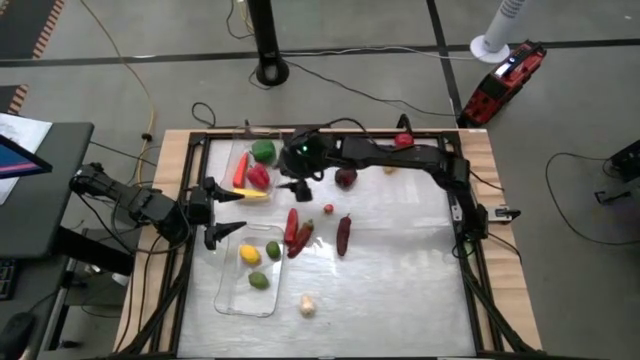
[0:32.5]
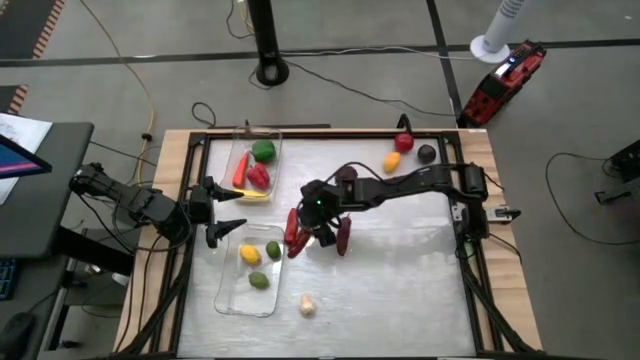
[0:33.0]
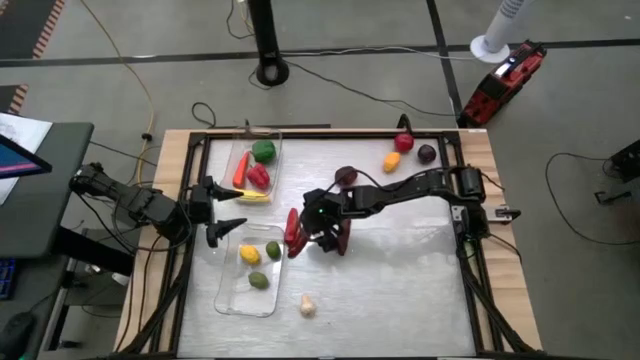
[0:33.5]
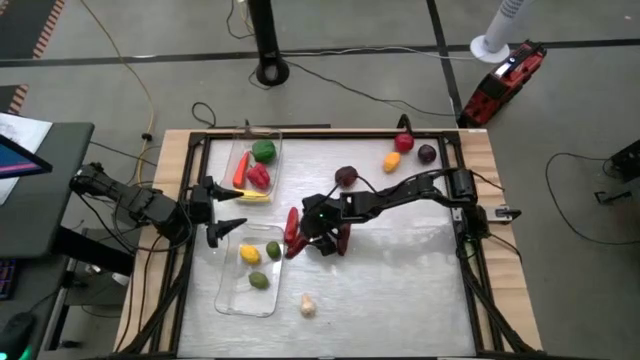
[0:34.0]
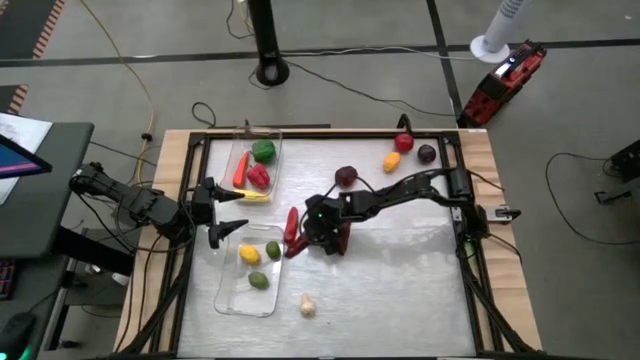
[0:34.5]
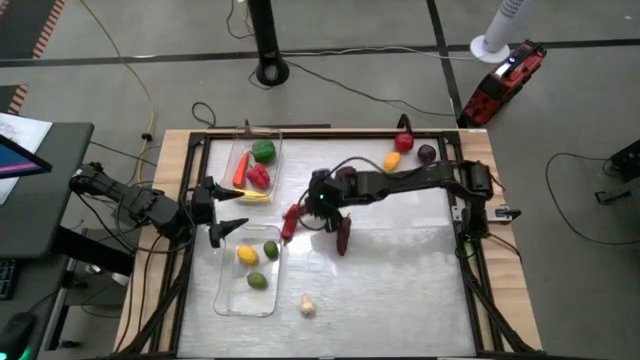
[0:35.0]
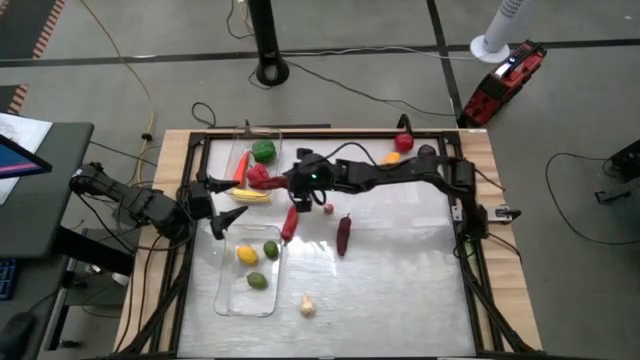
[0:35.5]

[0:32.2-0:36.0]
Task: Sort produce into baskets
Put the middle red chili pepper into the top transparent bin

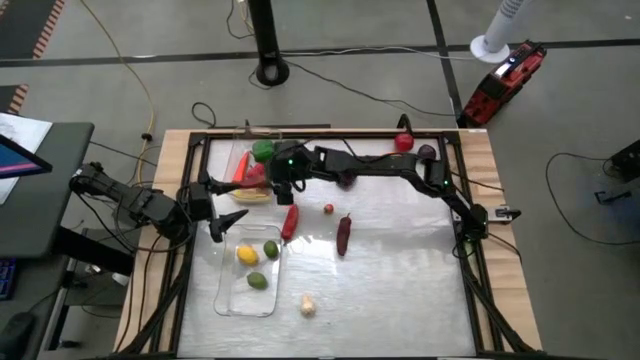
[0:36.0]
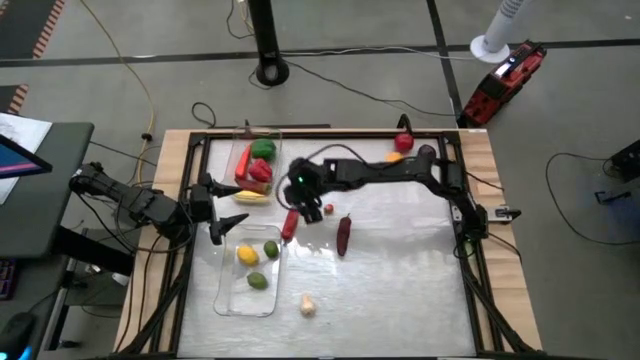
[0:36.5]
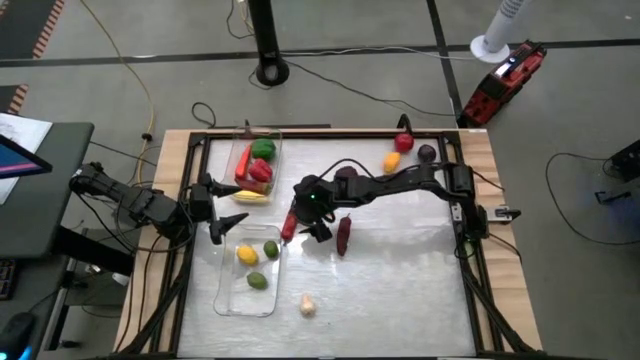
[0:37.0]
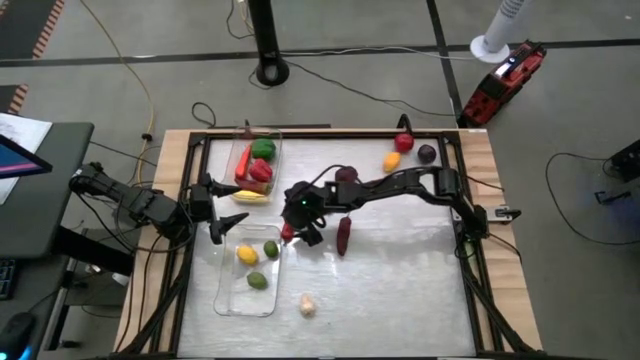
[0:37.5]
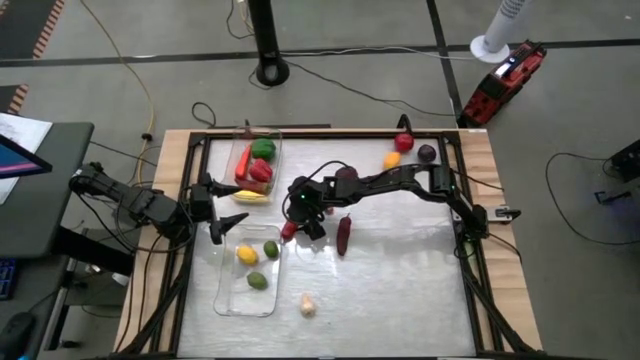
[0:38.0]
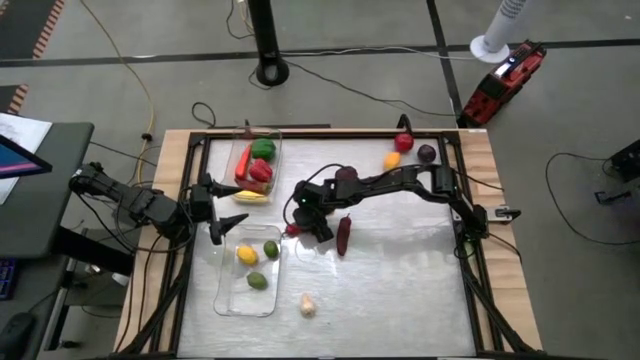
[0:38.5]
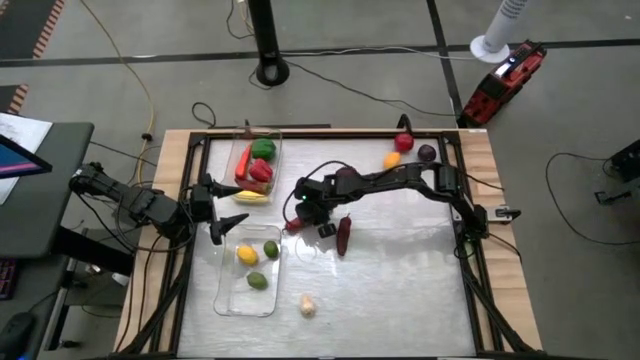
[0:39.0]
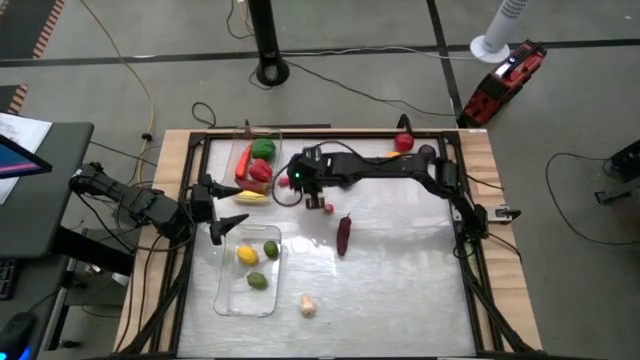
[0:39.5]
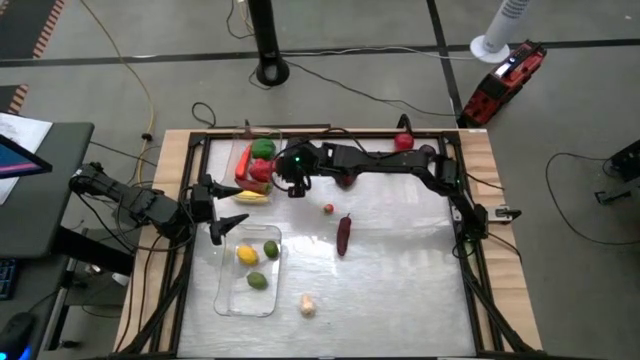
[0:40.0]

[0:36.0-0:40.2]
Put the left red chili pepper into the top transparent bin

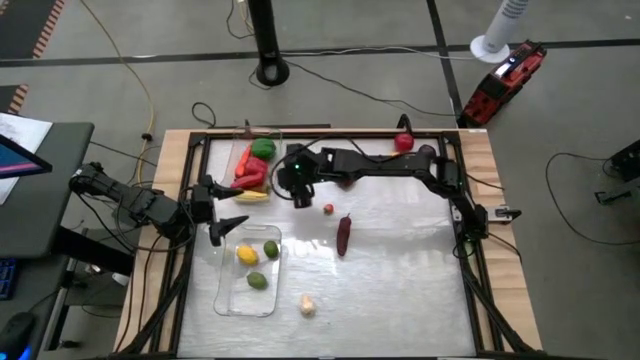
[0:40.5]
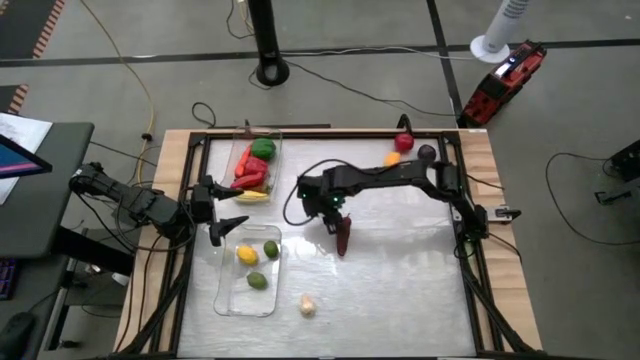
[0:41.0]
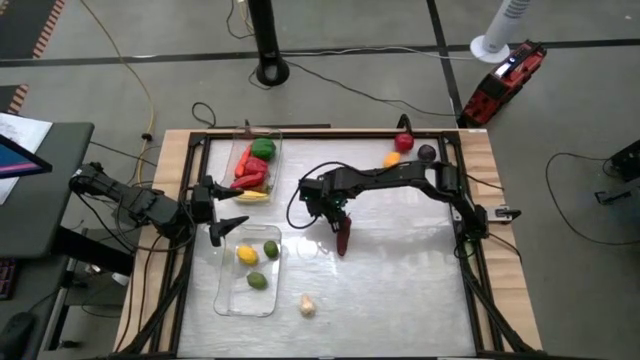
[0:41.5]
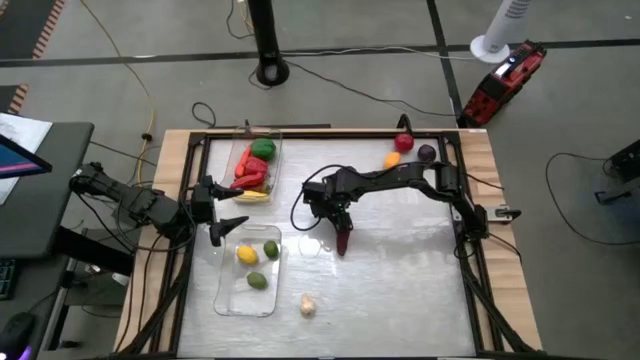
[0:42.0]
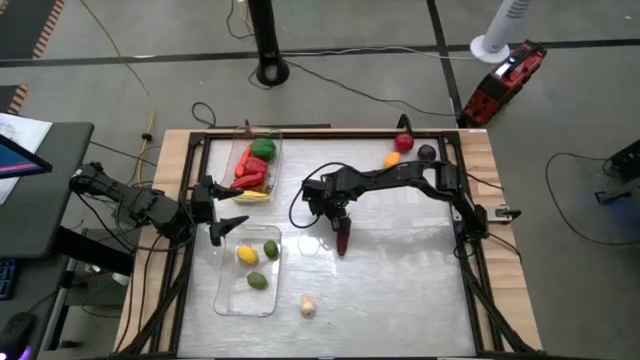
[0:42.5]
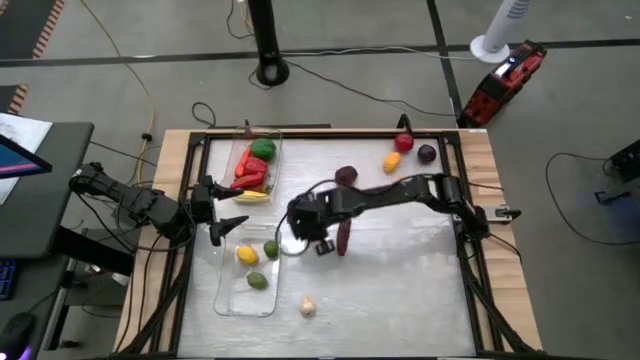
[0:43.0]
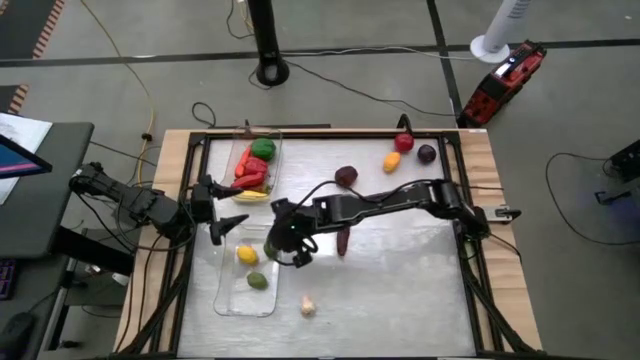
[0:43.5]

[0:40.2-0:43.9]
Put the strawberry into the bottom transparent bin

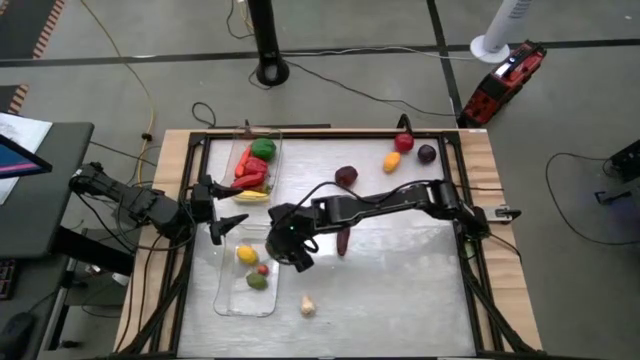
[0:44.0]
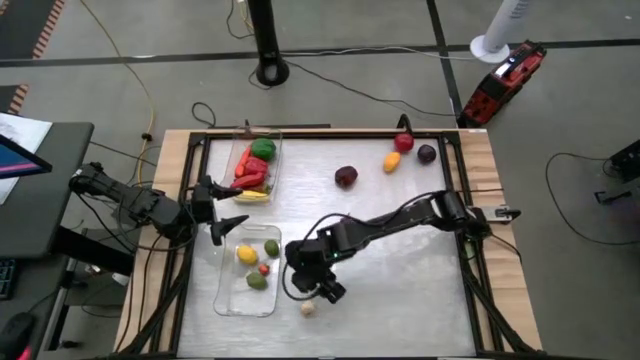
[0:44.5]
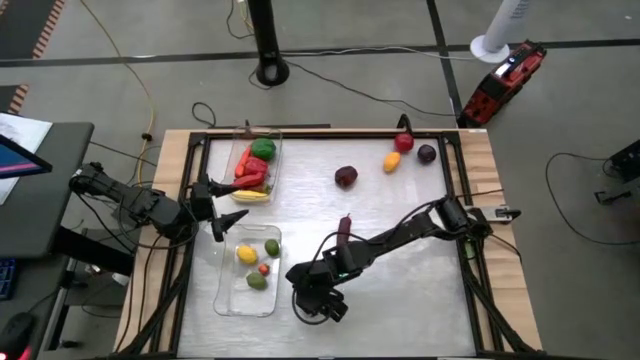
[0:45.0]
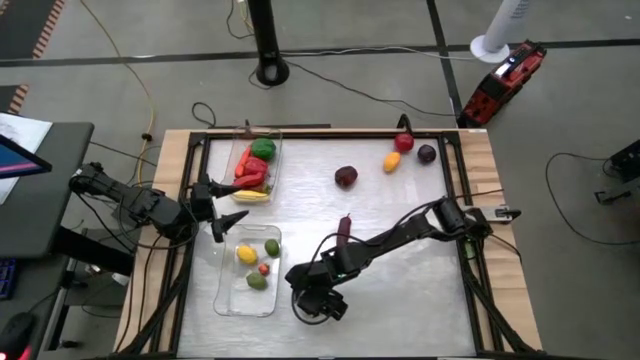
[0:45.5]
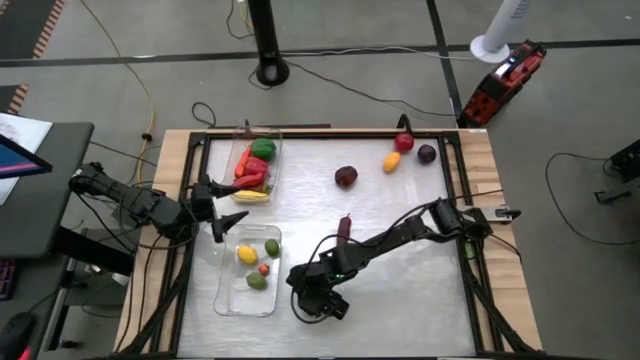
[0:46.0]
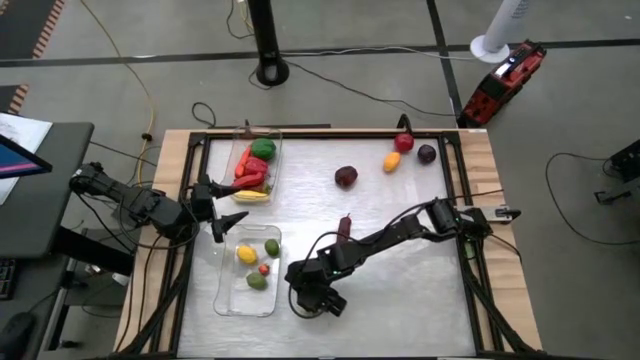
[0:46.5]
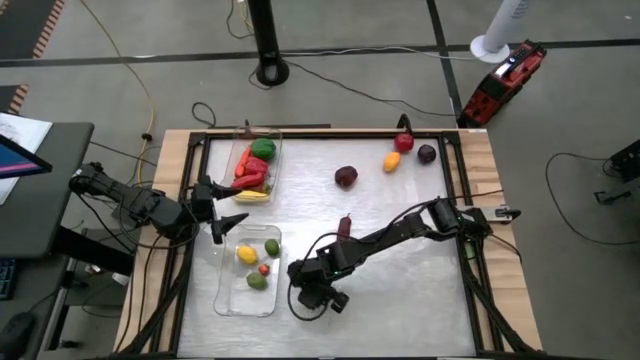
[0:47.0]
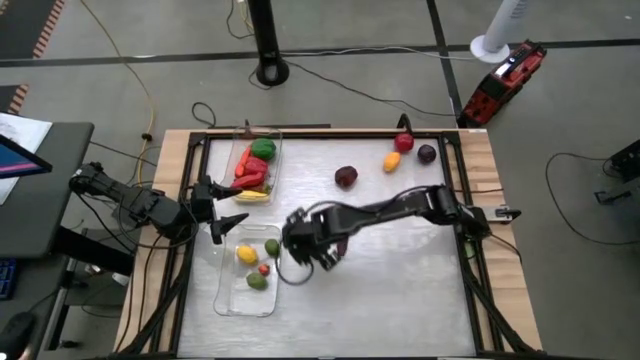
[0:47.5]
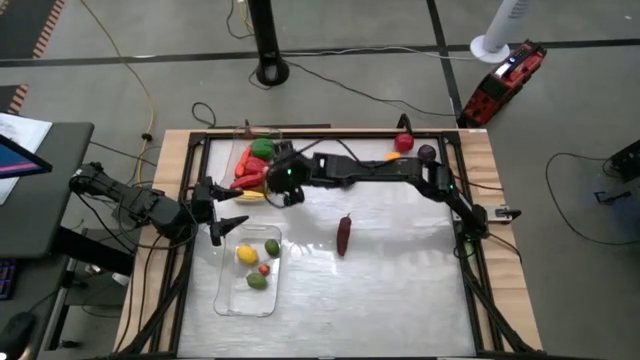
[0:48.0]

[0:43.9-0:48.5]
Put the garlic into the top transparent bin

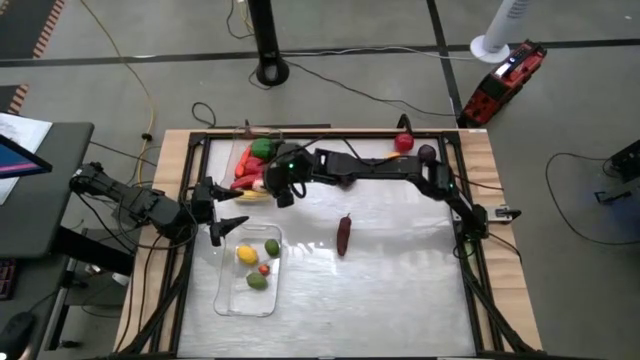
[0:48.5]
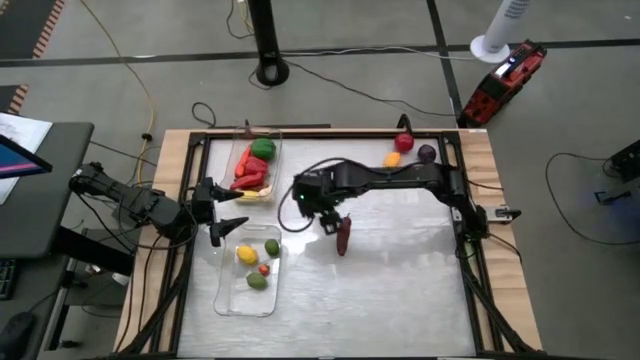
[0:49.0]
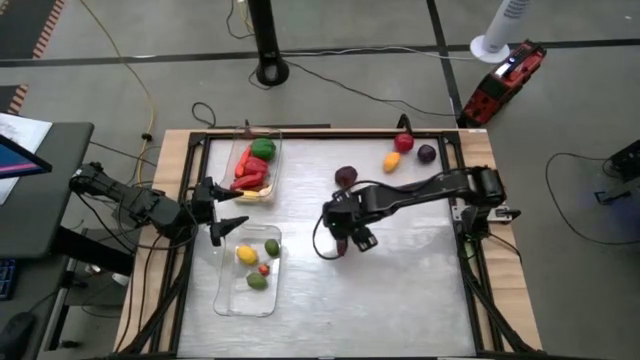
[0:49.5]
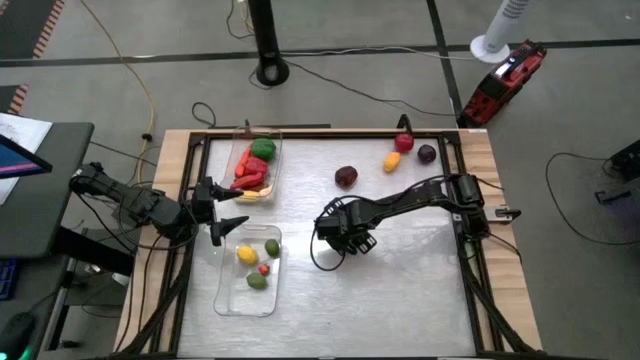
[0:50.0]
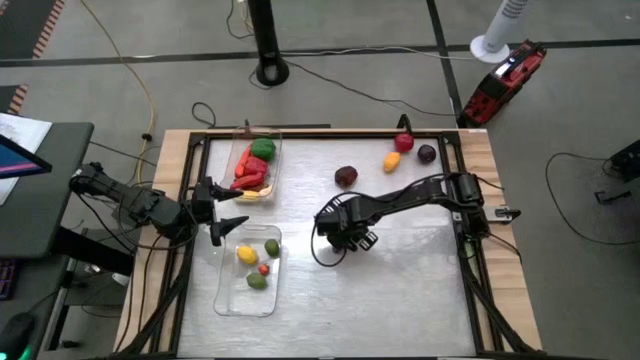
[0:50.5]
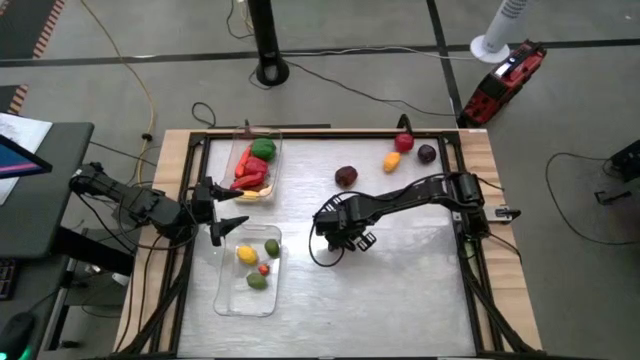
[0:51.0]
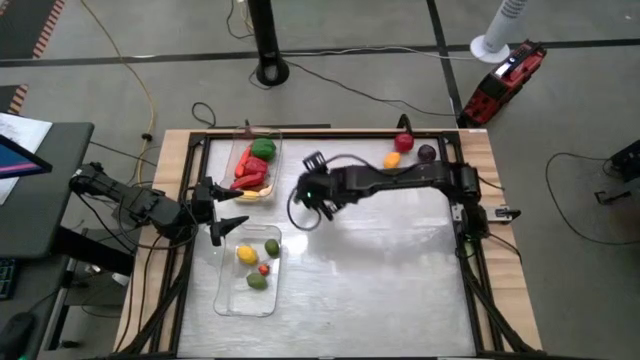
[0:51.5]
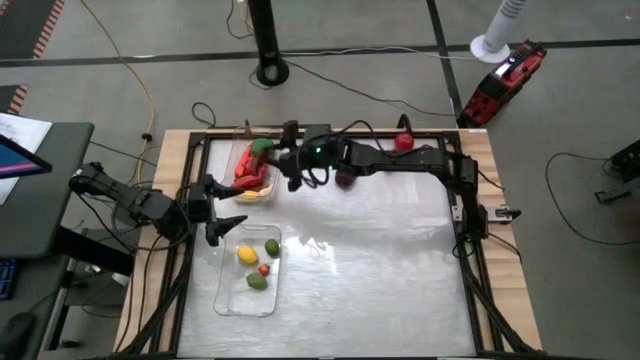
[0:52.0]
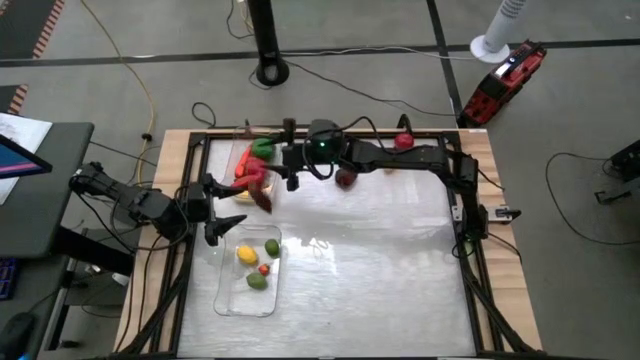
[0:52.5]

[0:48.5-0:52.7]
Put the red chili pepper into the top transparent bin

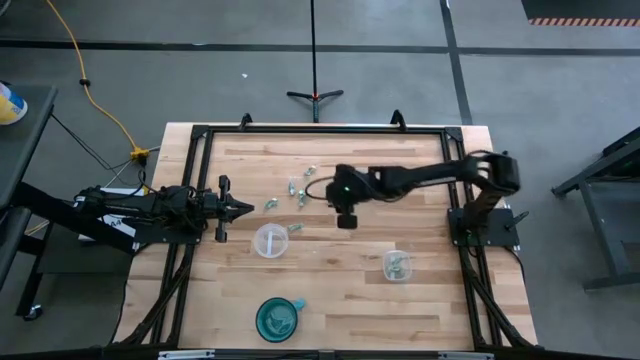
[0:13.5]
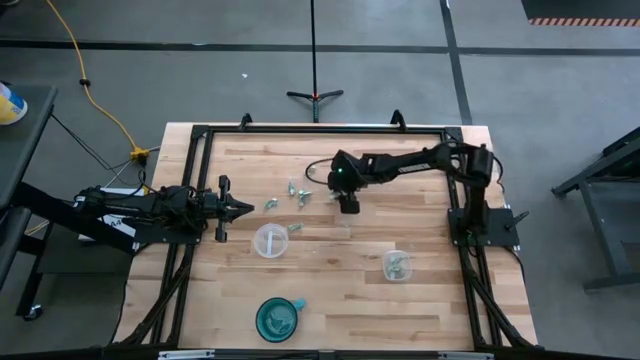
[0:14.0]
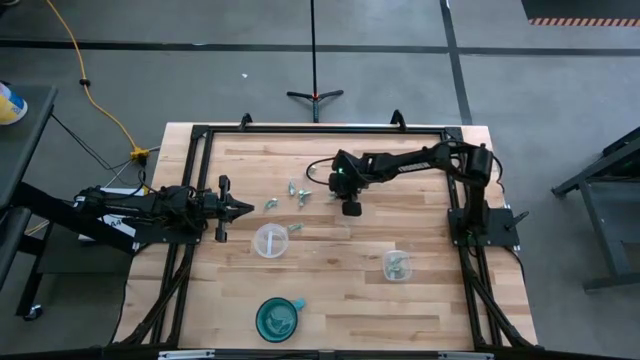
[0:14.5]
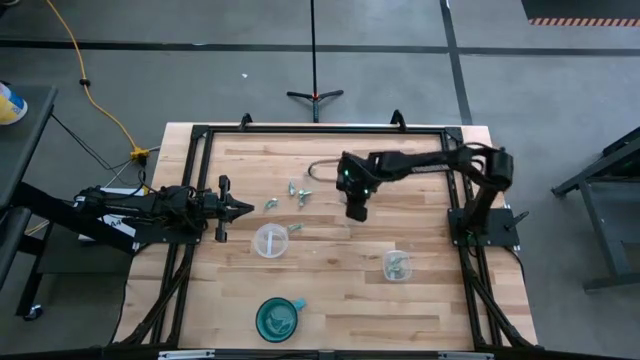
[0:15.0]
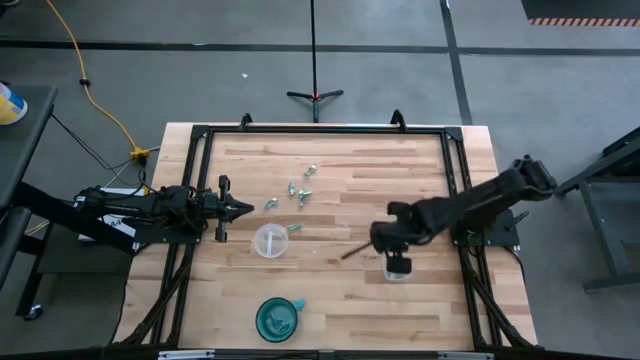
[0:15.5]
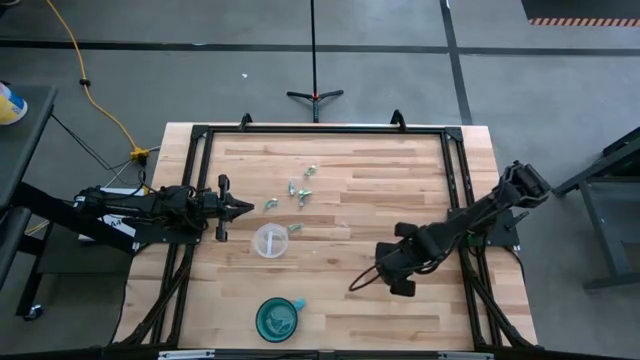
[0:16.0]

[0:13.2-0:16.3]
Task: Sort candy
Put the green candy into the square transparent bin
